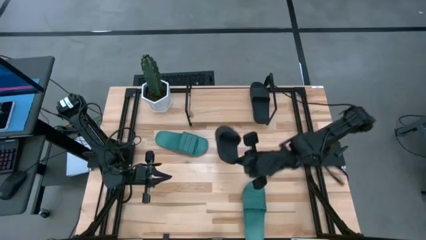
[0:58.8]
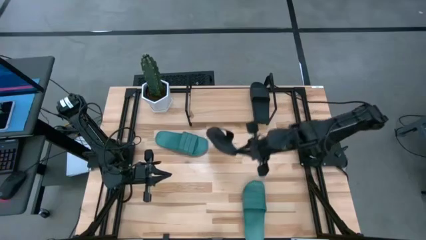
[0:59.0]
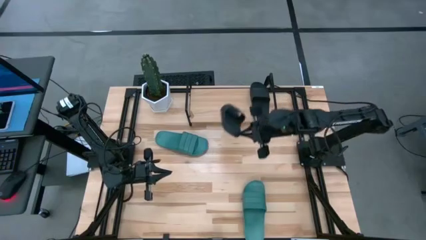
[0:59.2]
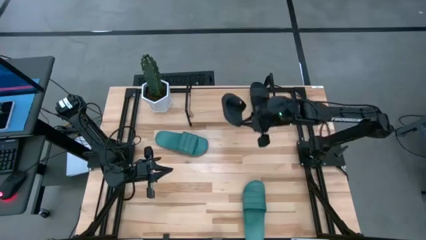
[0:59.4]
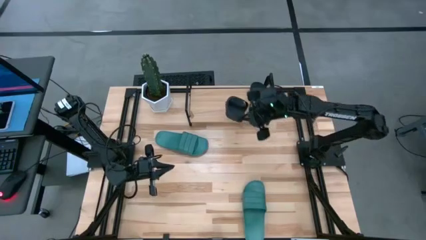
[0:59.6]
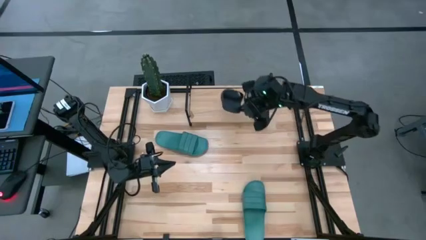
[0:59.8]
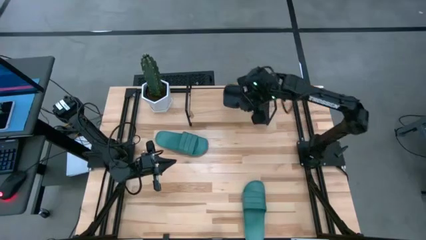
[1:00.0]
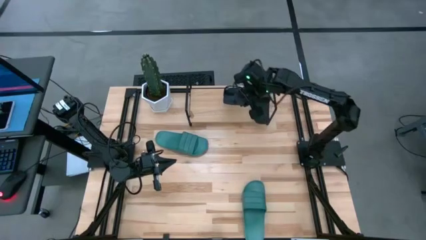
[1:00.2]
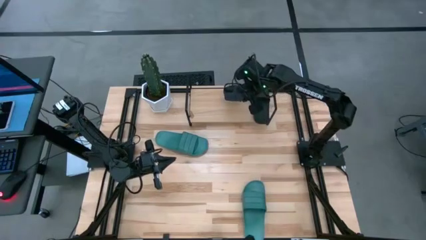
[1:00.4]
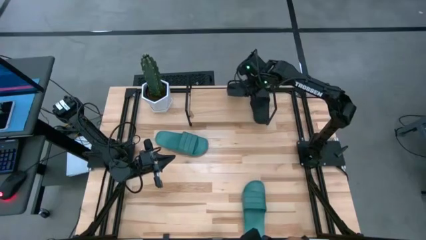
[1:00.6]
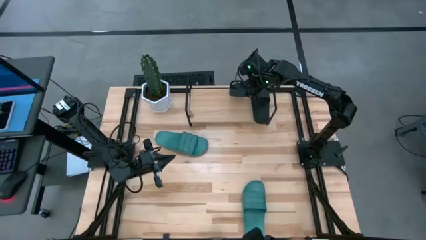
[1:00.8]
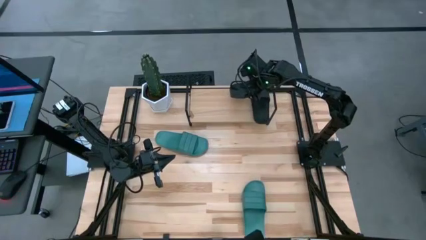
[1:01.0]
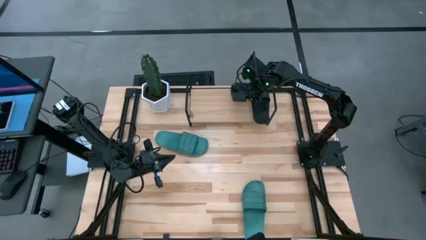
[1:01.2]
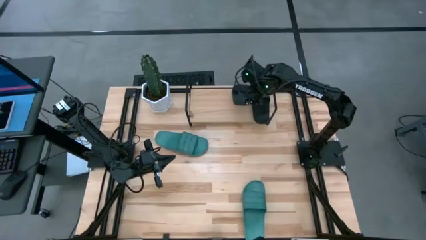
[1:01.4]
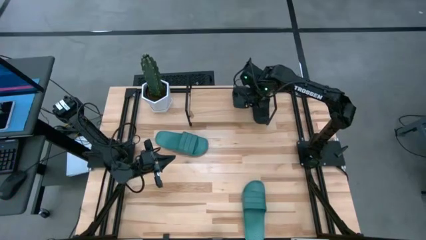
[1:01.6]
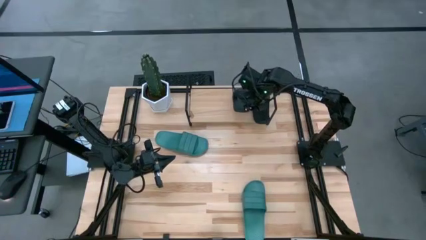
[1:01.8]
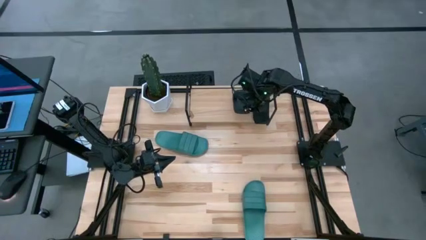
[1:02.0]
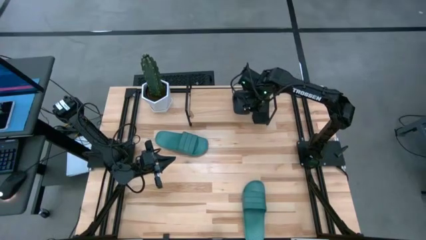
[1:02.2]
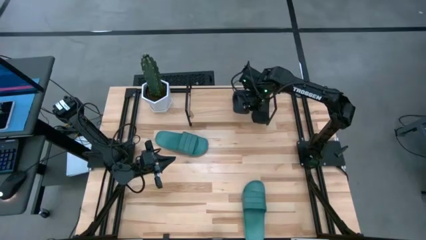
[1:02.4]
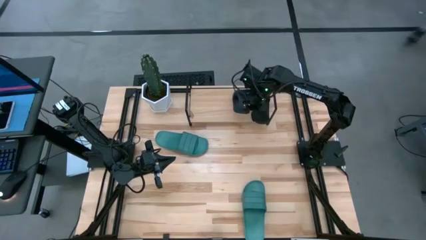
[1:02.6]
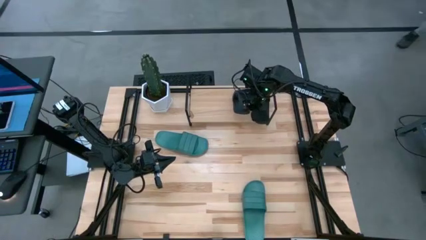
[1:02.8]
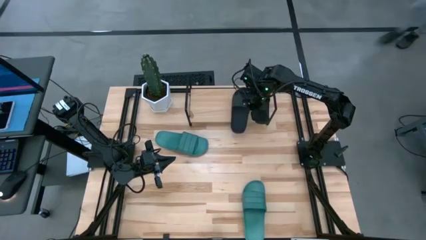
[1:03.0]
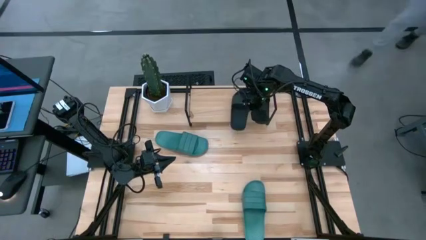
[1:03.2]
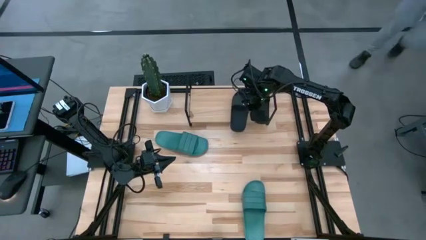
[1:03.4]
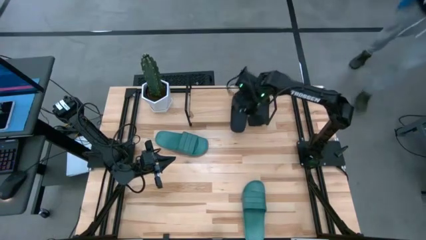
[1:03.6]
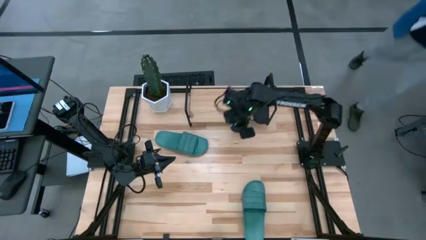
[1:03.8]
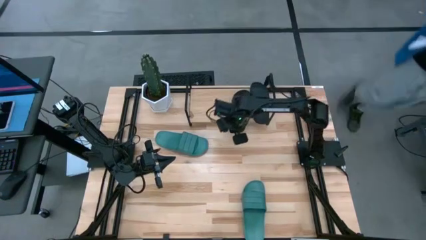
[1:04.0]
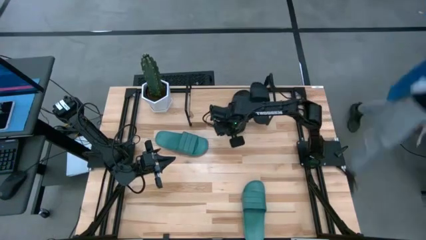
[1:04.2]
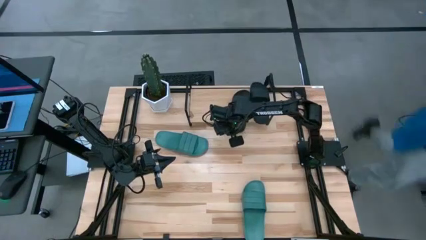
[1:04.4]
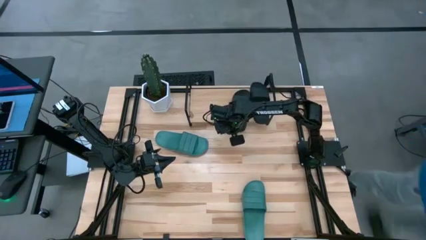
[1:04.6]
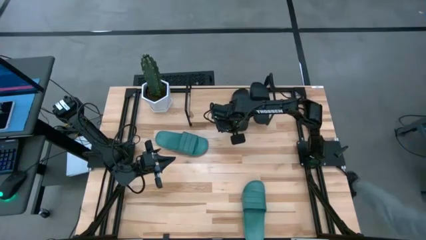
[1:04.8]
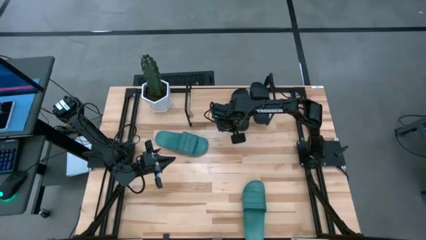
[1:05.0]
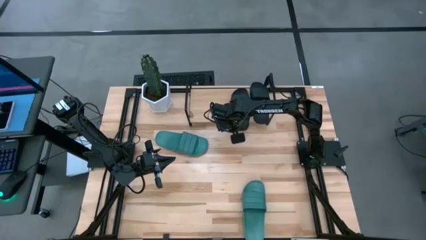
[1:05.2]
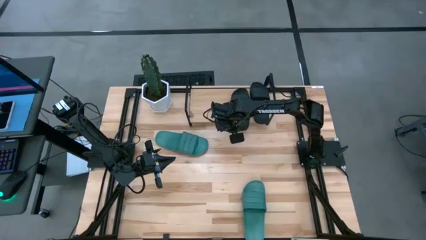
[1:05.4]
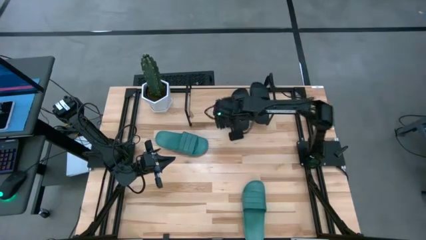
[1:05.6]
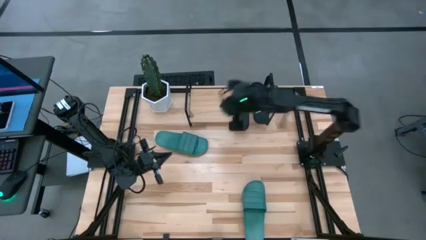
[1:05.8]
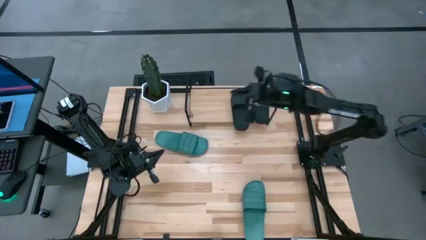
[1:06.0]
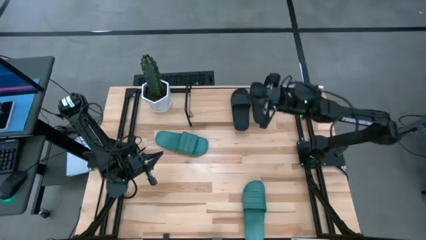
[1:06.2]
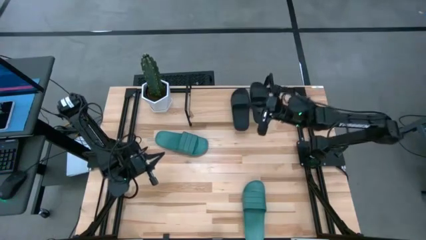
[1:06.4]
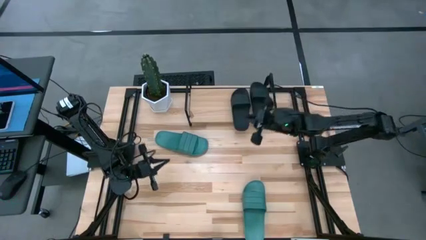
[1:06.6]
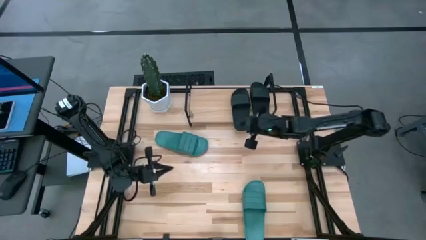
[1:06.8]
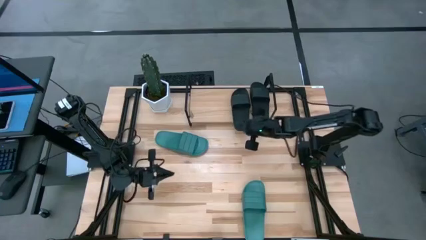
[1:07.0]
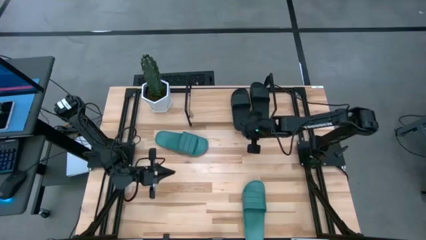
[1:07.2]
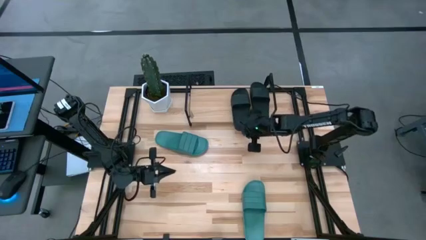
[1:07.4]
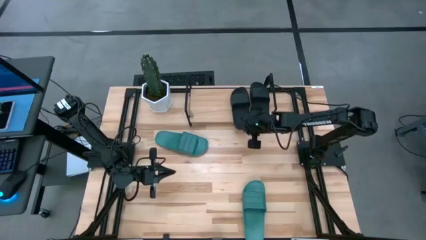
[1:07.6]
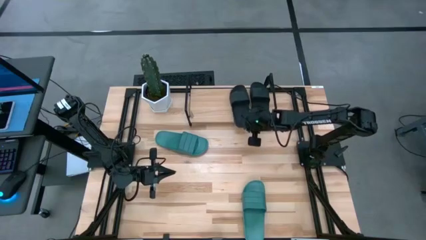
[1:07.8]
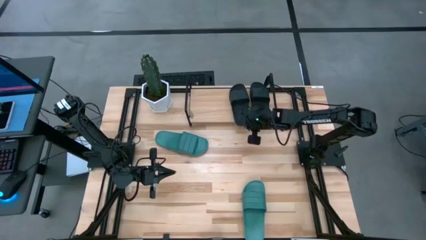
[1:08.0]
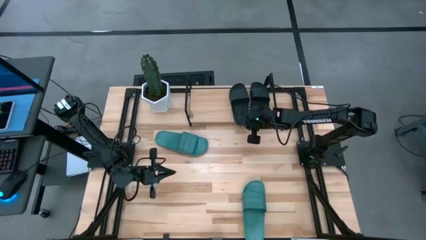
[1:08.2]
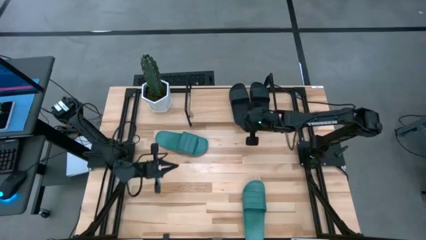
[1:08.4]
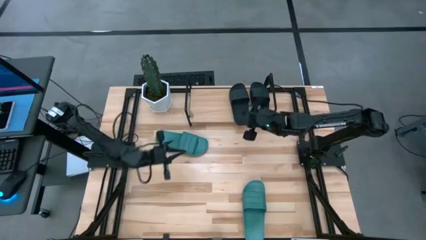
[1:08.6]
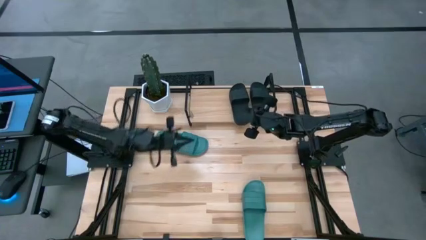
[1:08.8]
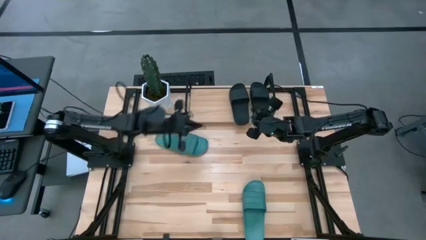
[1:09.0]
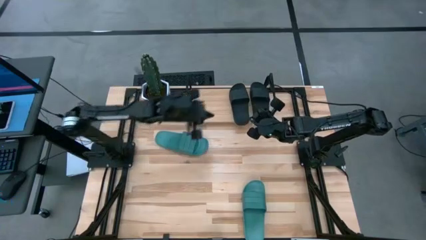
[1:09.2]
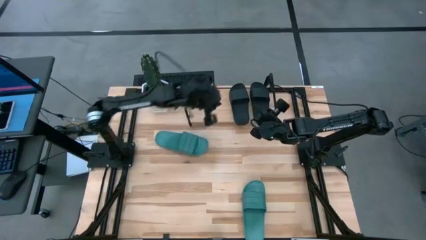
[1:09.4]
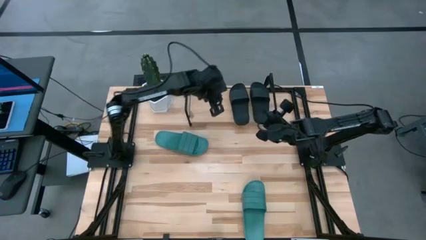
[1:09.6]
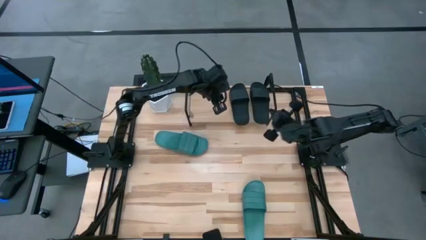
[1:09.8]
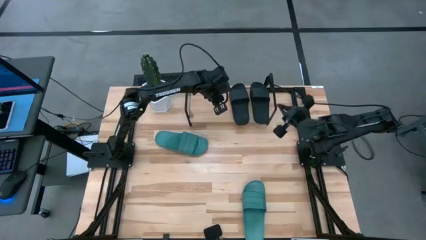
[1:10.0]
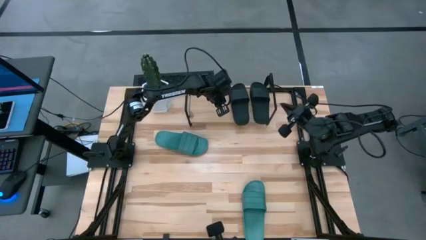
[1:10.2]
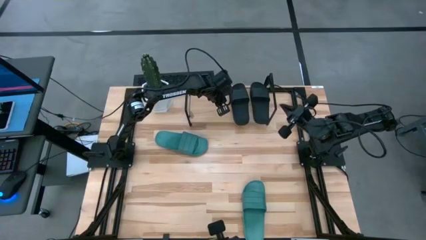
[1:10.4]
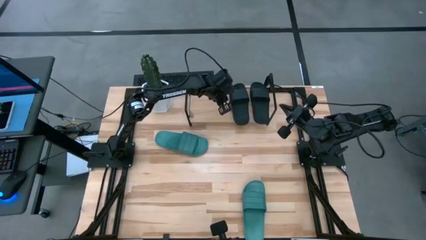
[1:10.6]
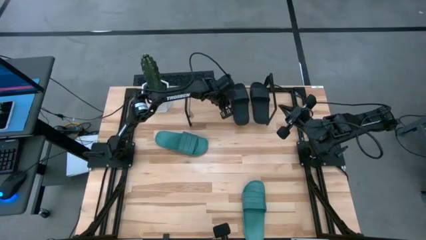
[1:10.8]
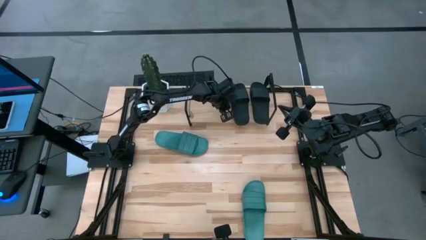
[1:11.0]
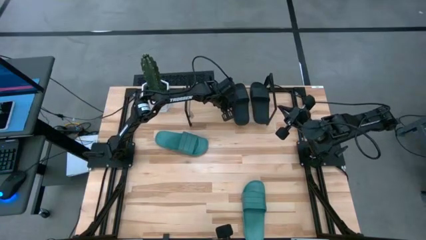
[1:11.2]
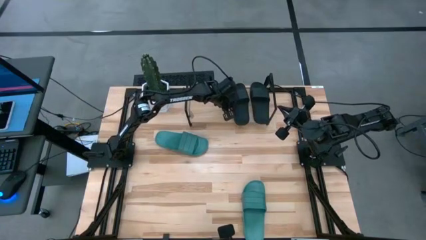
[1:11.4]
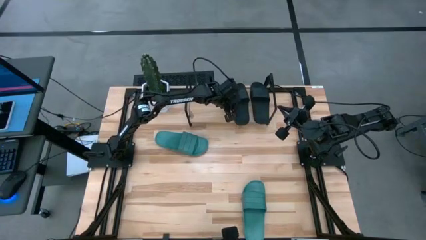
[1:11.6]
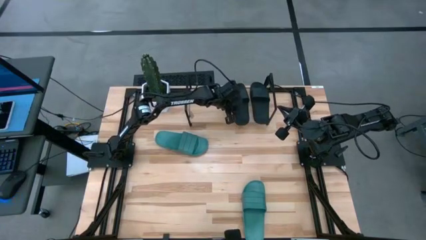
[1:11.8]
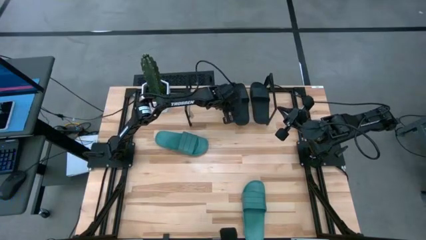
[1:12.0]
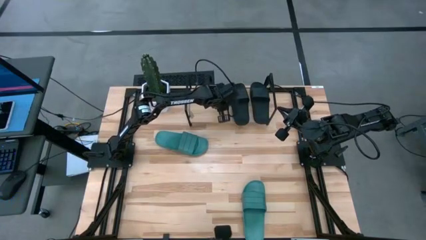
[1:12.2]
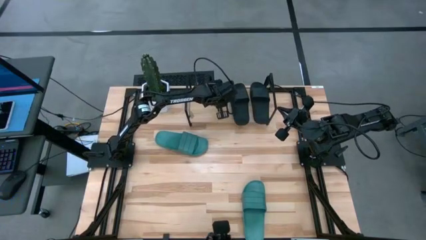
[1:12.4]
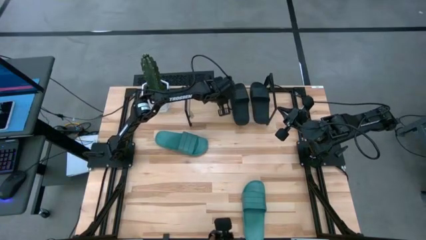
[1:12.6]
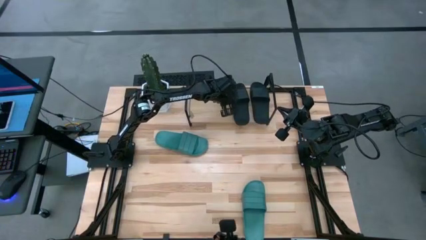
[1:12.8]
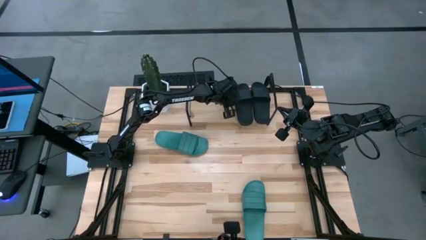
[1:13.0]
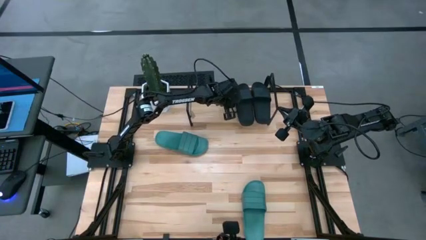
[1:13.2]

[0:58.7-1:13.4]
Task: Pick and place slides into the shelf
Put the black slide on the shelf
